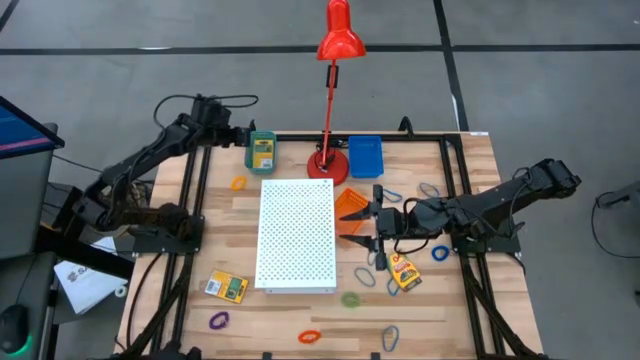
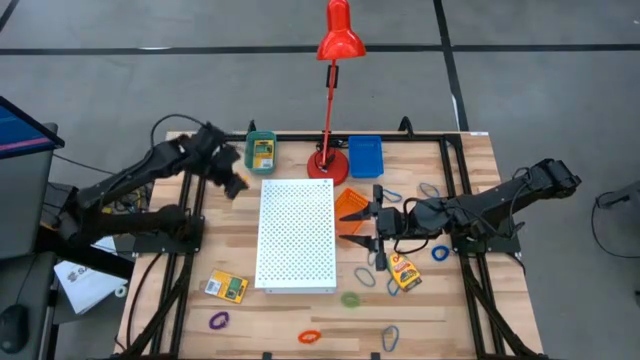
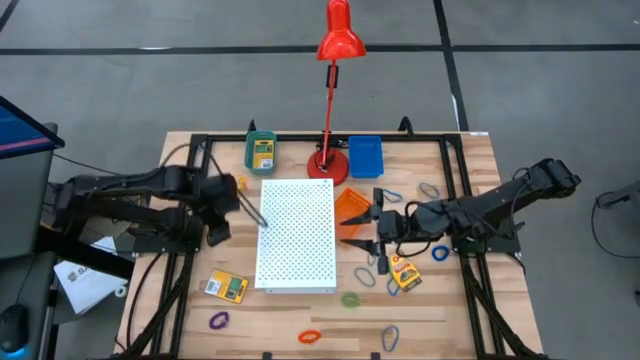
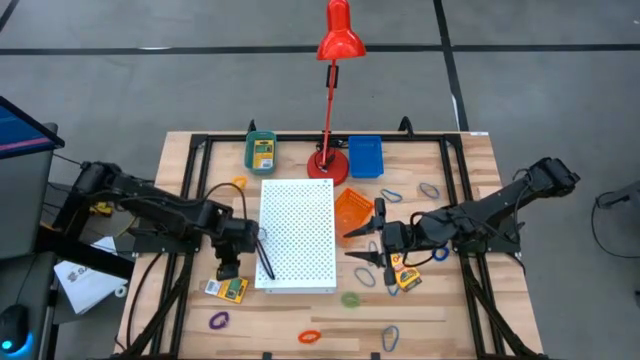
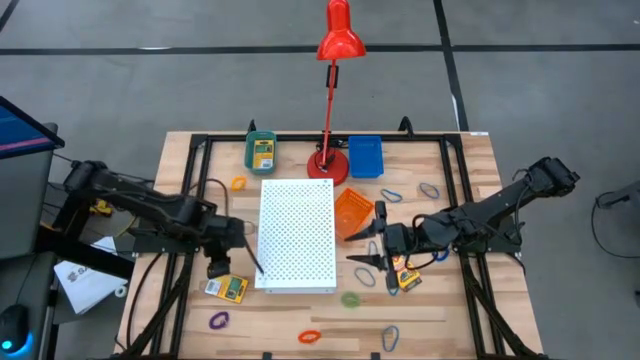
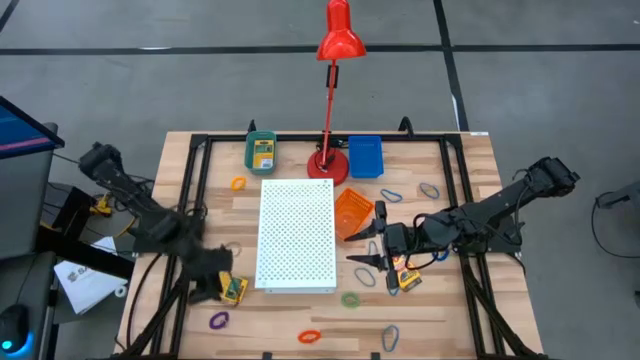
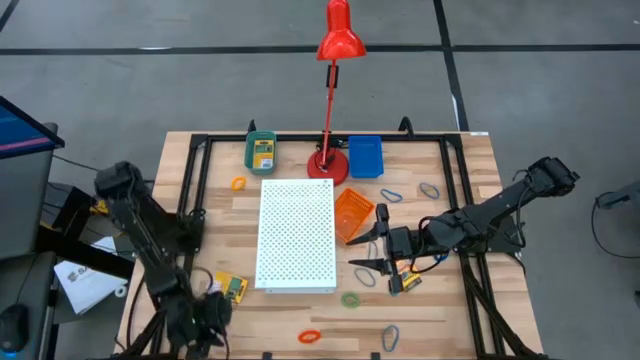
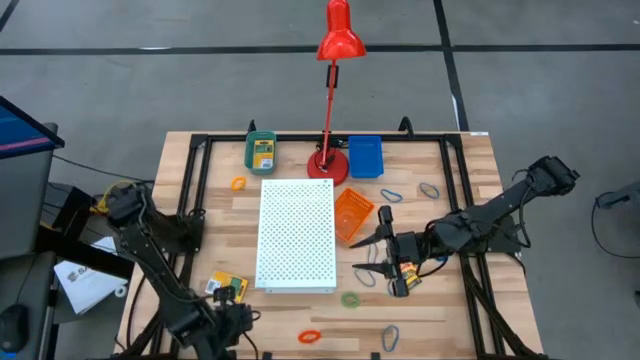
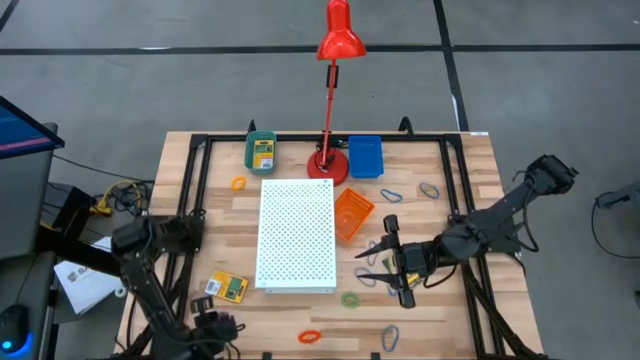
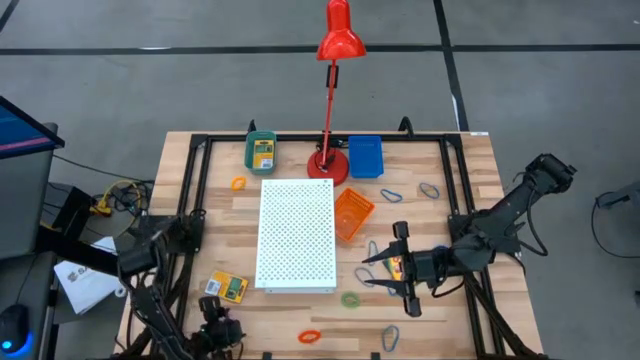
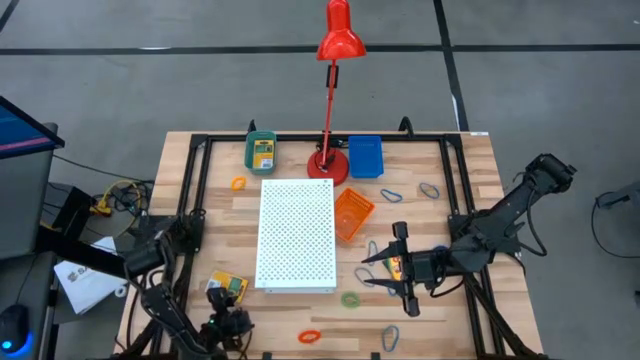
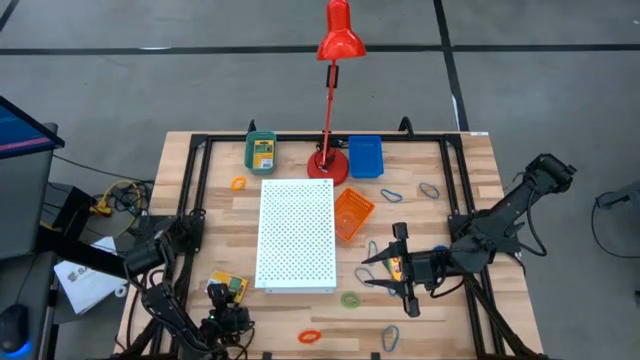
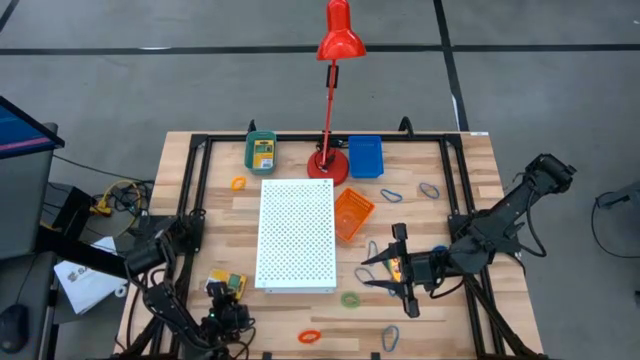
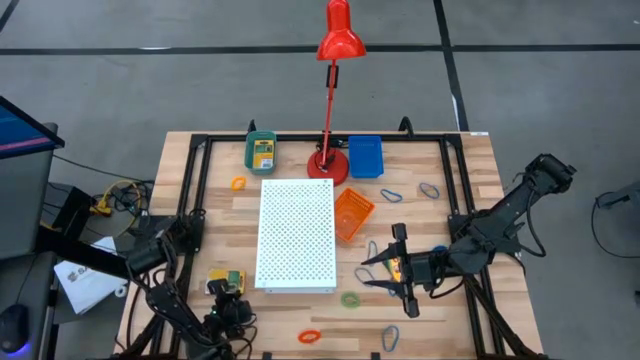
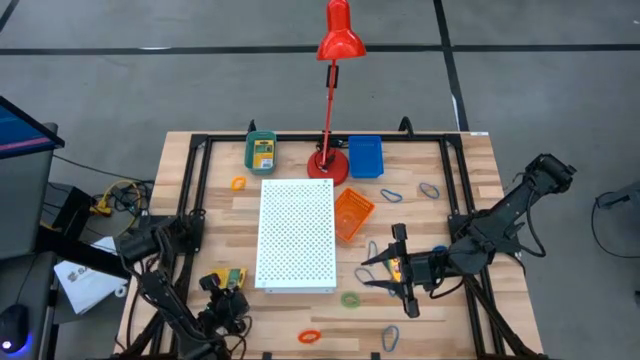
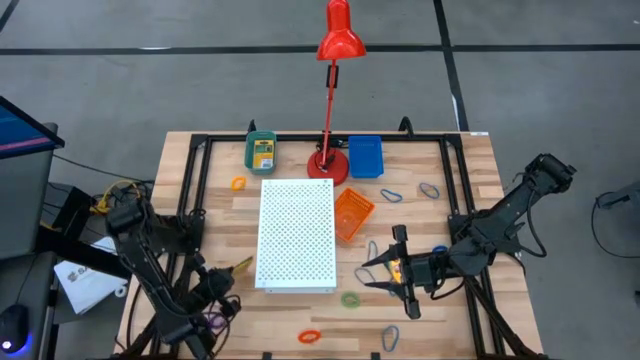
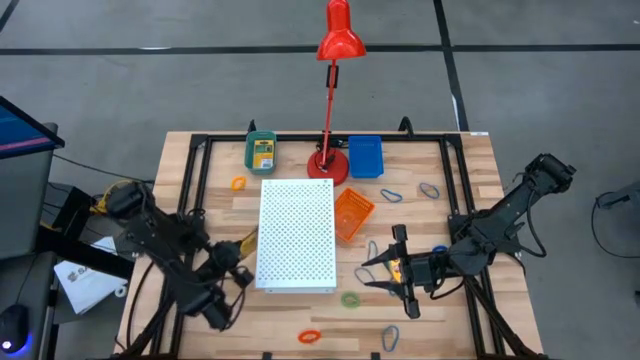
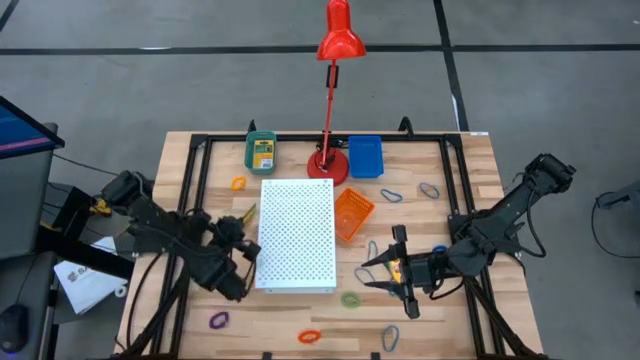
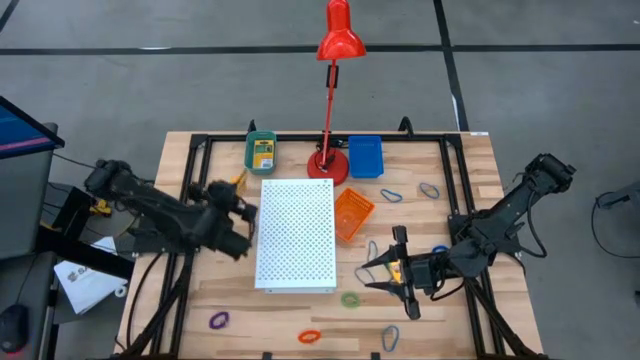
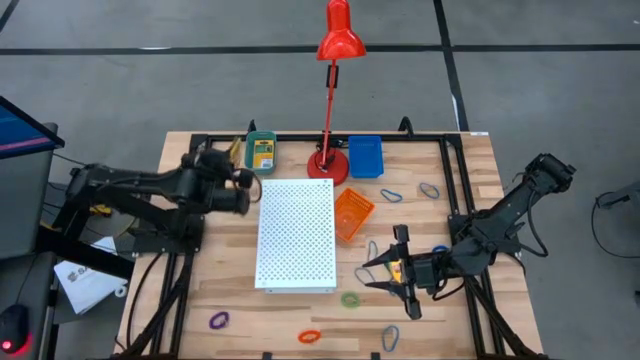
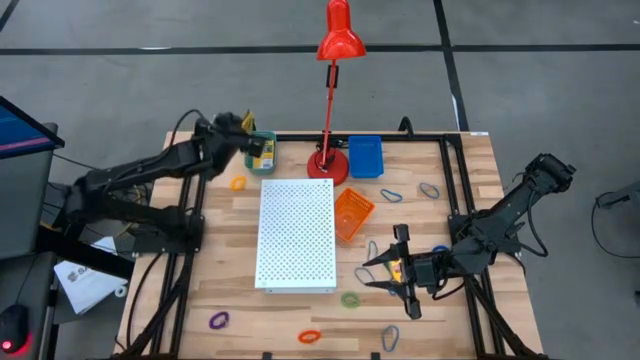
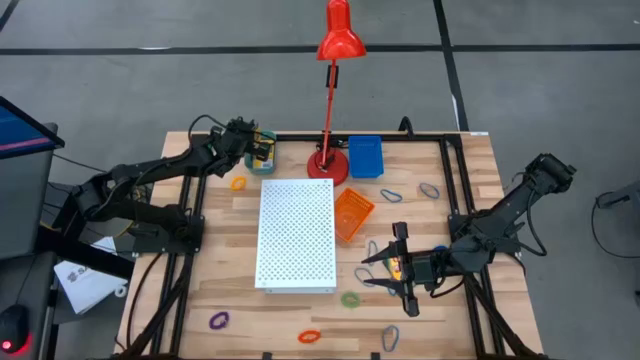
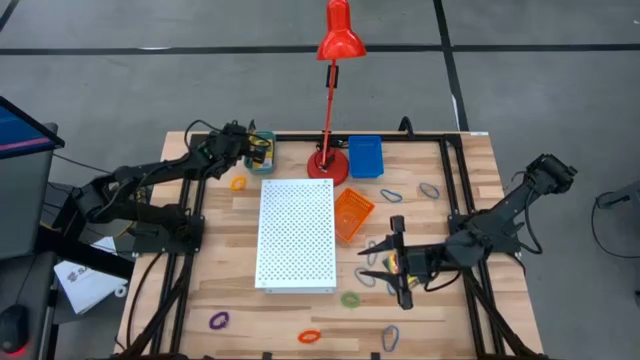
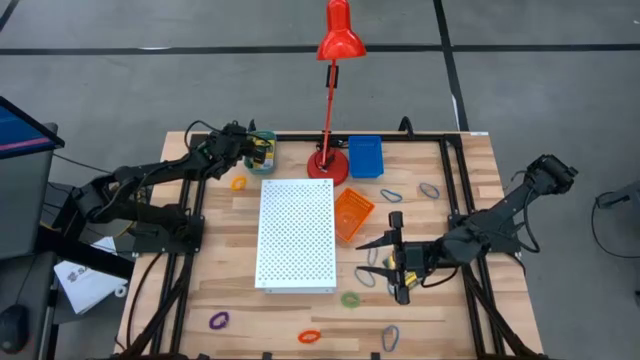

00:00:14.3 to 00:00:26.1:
Task: Pick & Place Office Desk Supplies
Put the yellow crayon box into the green bin

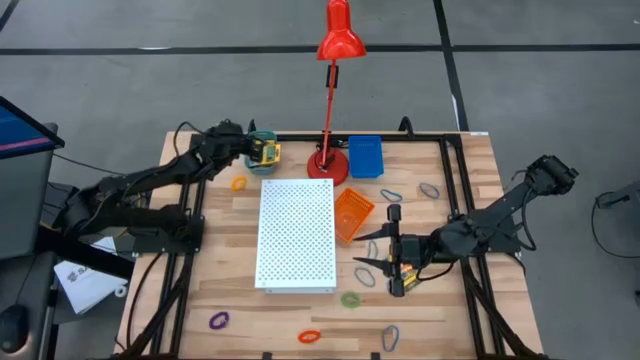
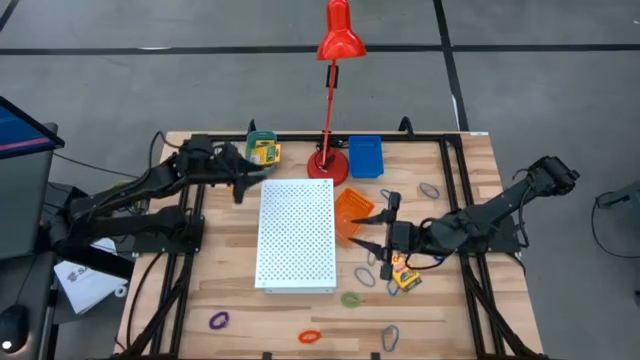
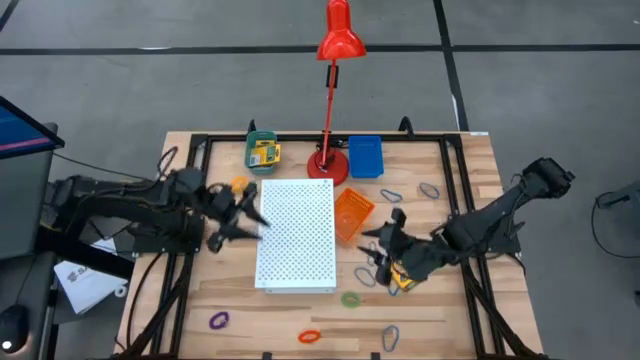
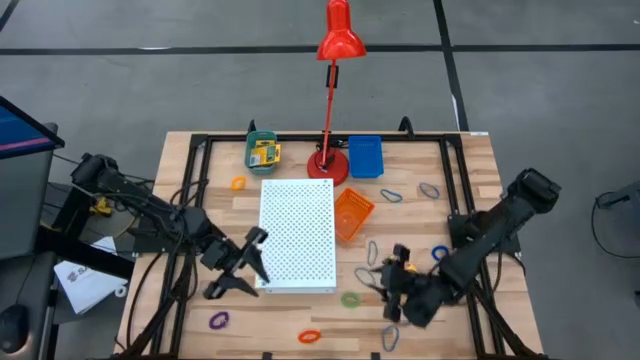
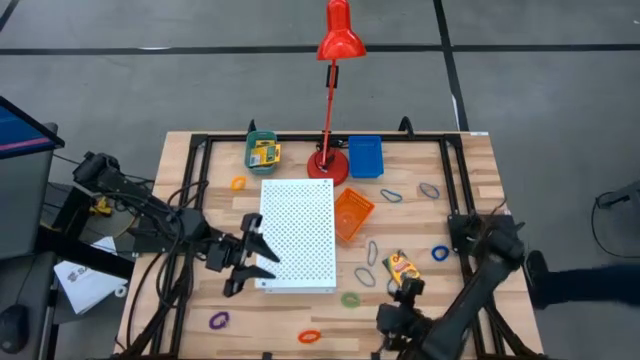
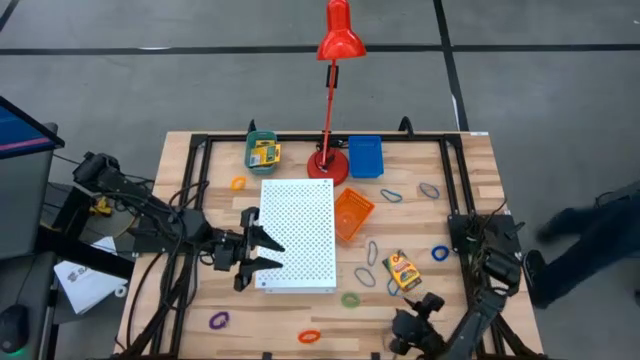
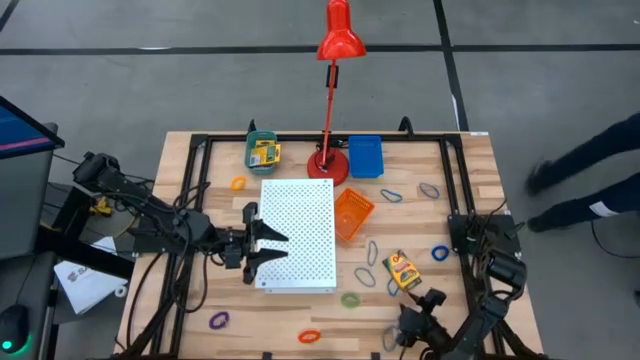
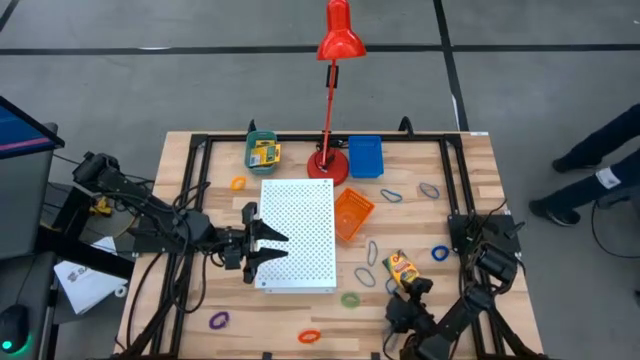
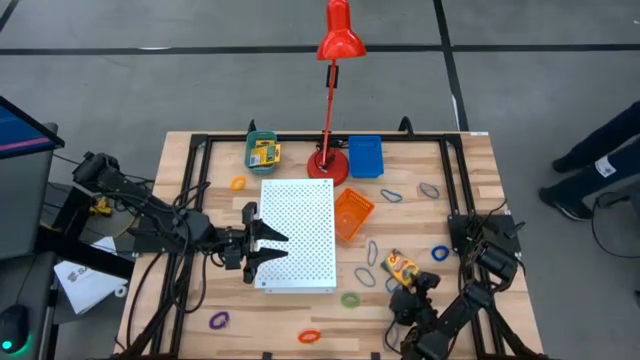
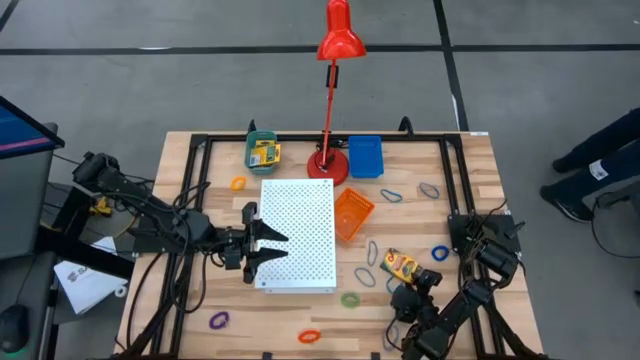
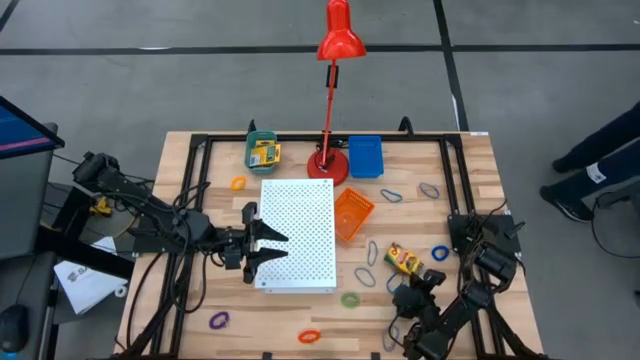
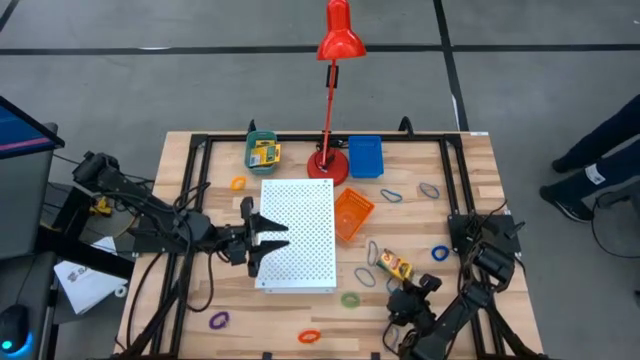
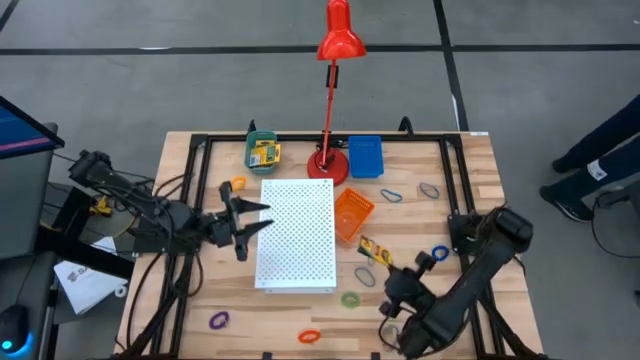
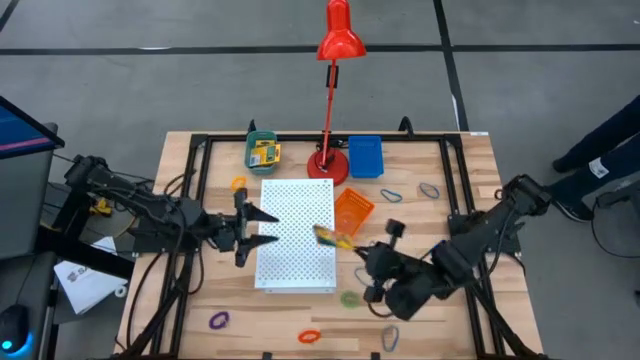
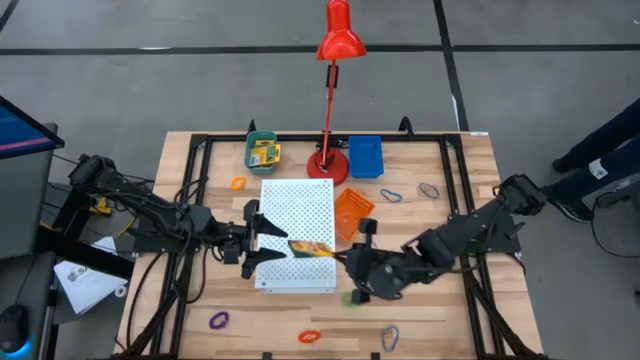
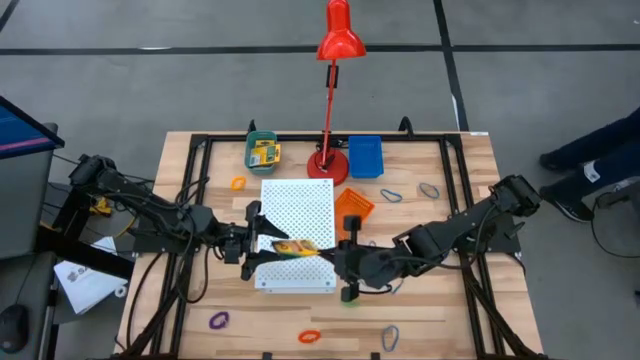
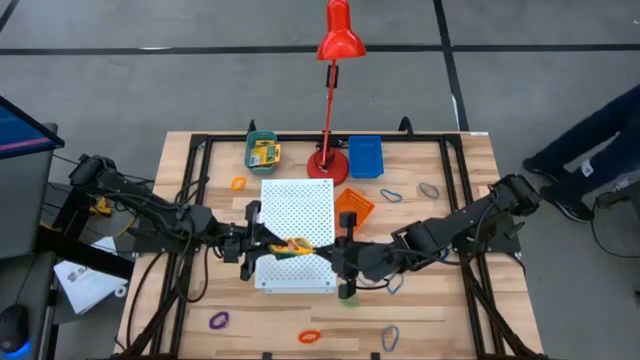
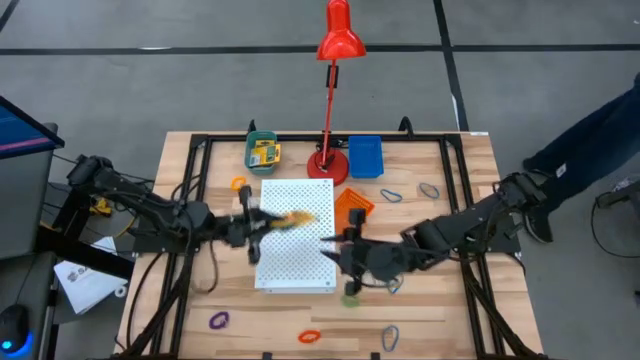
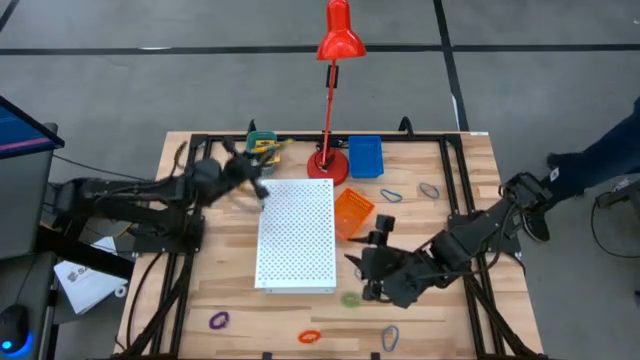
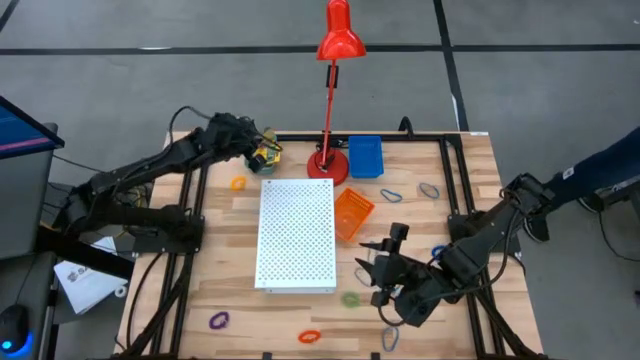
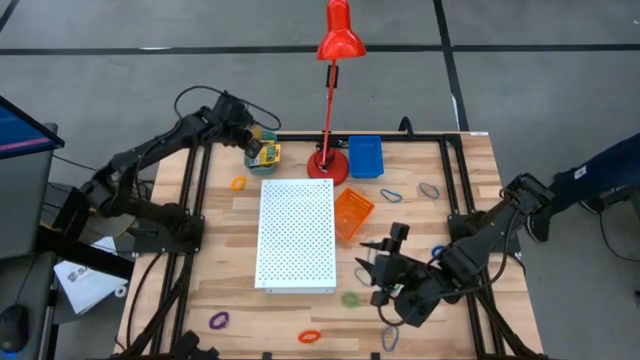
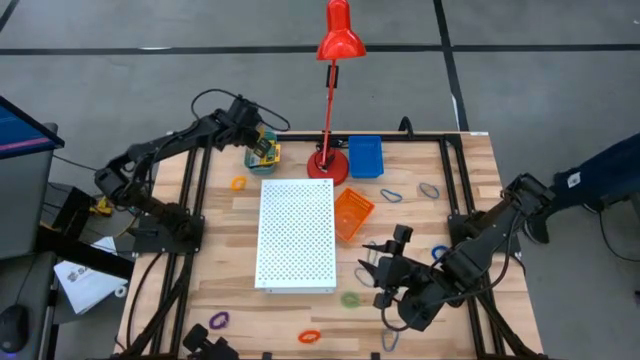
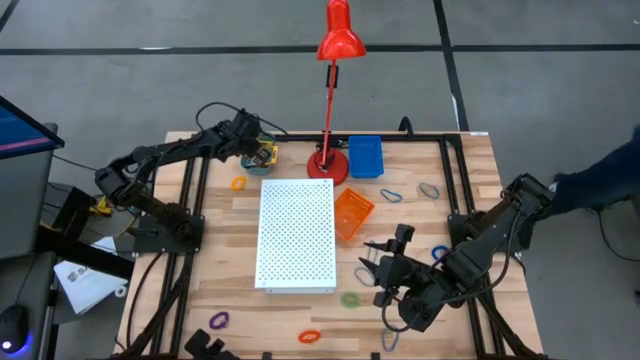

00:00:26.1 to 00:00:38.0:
Put the yellow crayon box into the green bin
